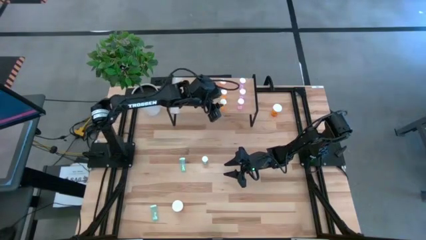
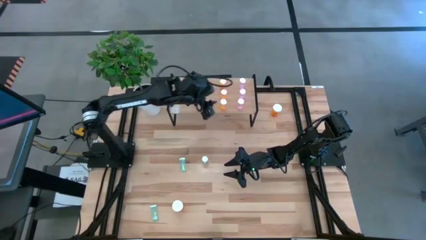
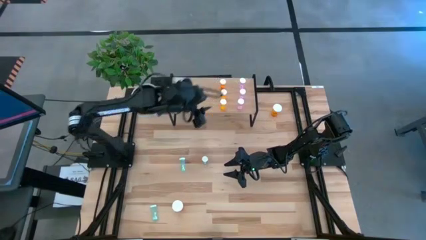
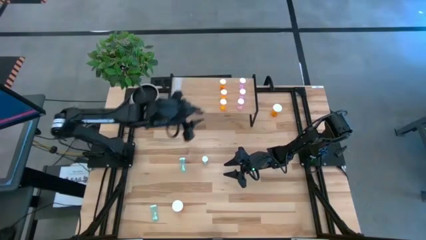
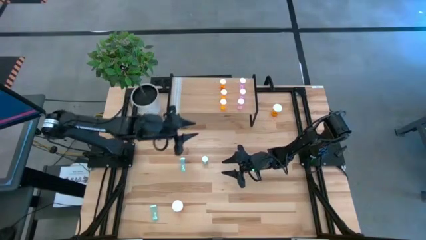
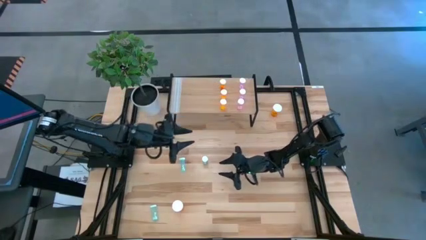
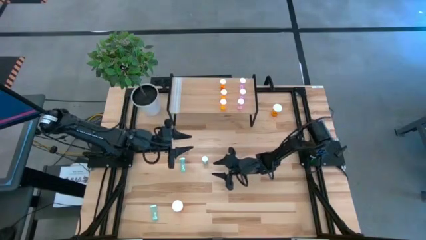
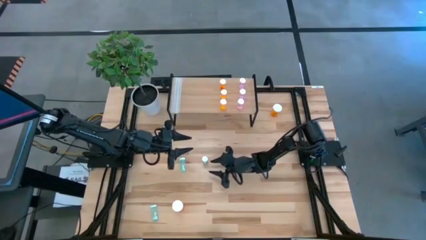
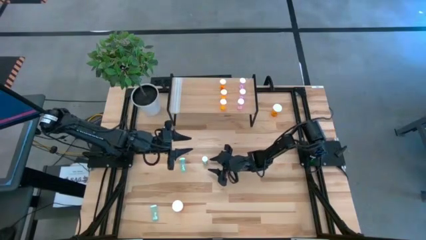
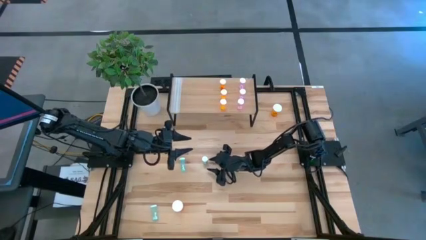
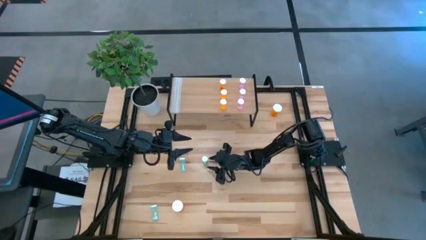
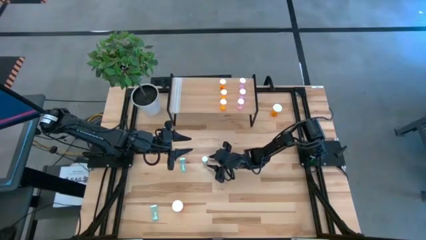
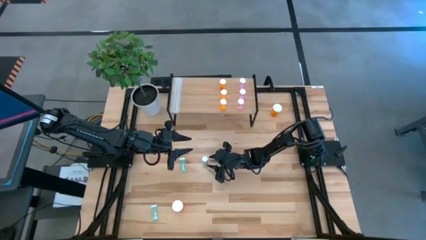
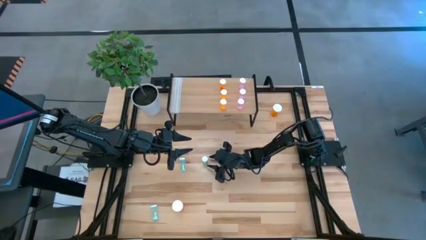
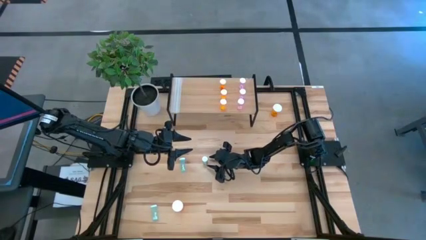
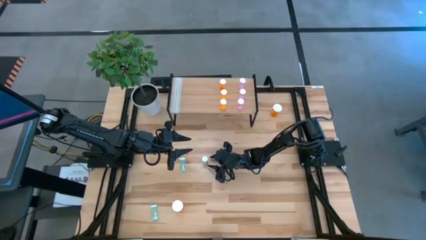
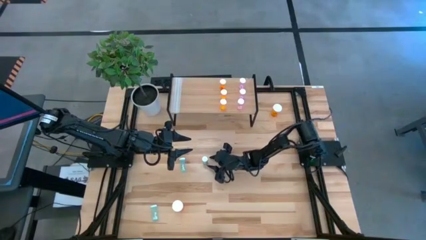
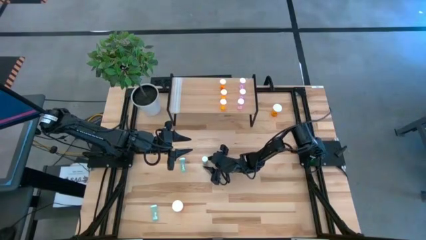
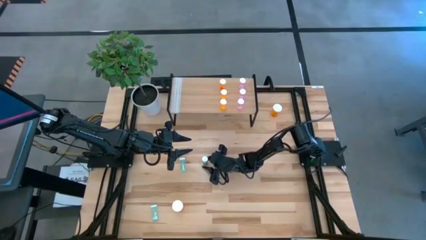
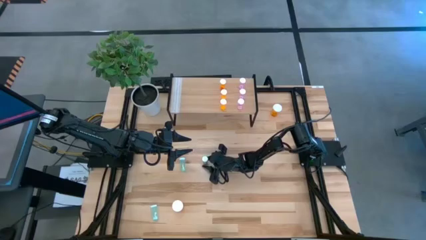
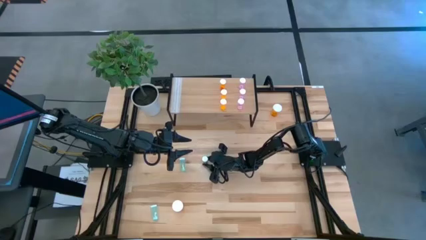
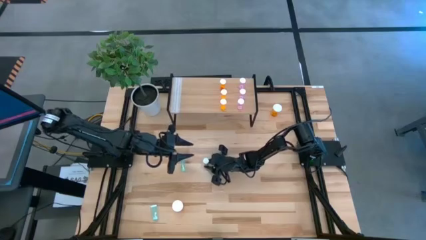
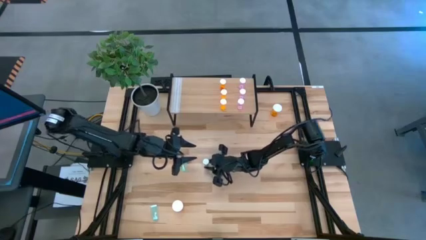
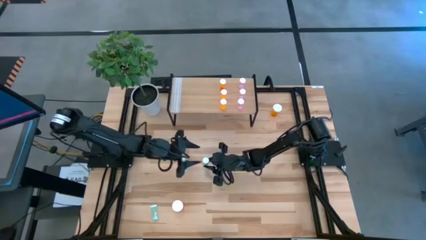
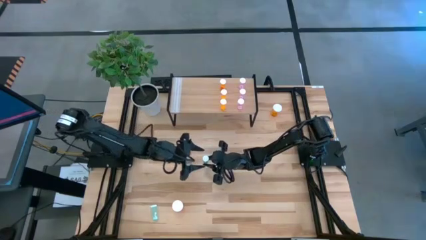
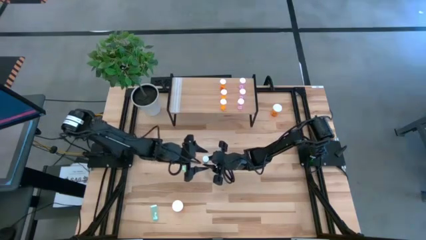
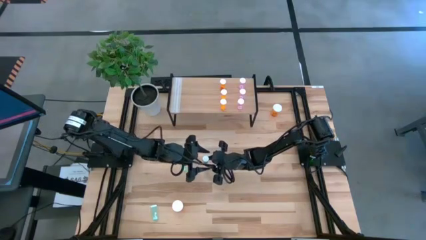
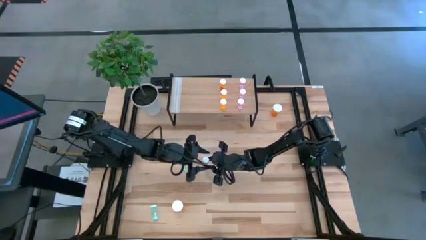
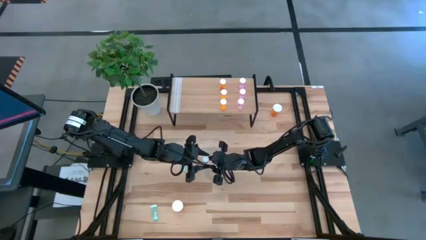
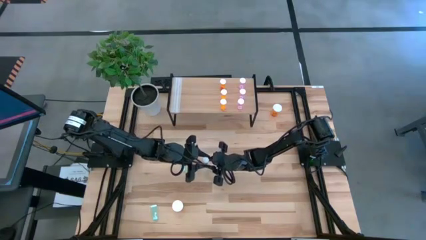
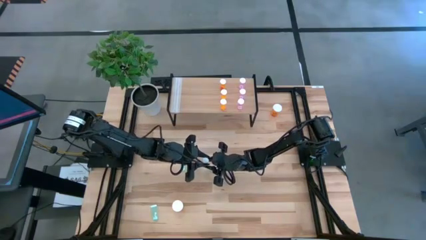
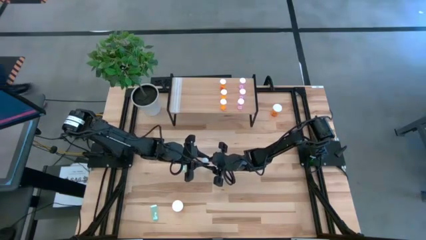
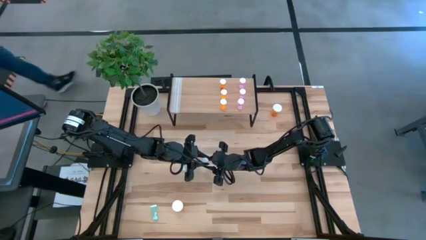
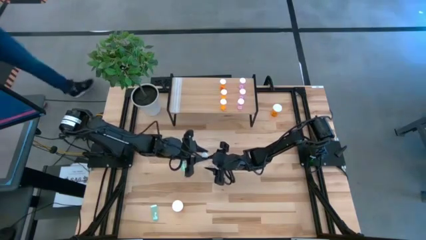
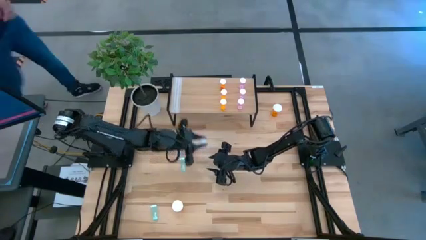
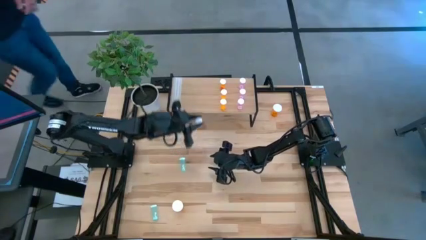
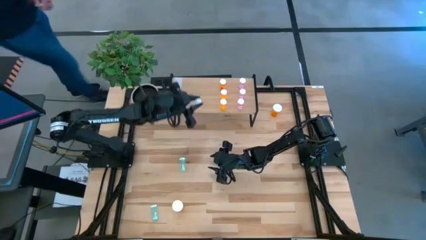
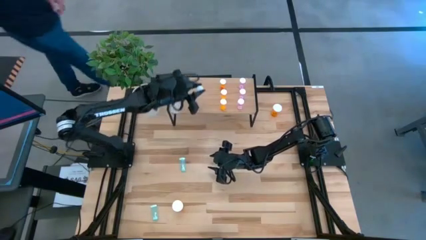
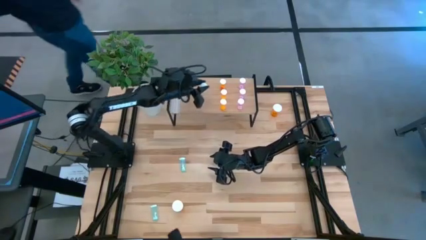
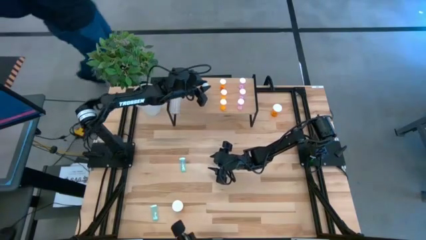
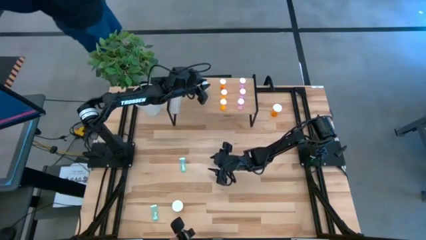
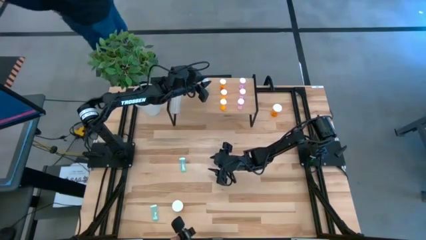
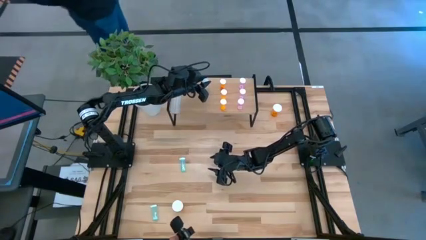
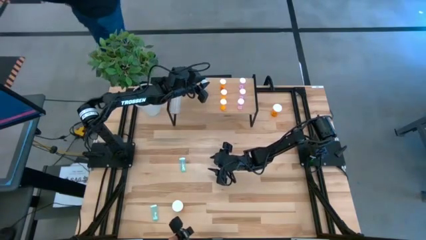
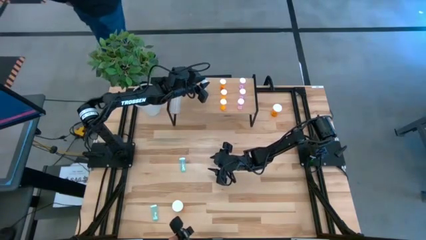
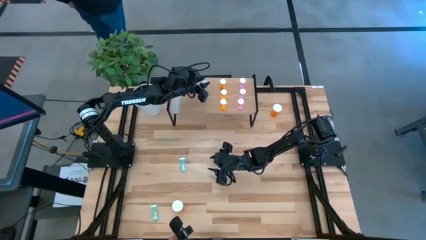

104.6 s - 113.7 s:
Task: Pick and place medicine bottles onto shelf by color
Put the right blue pill bottle on the shelf

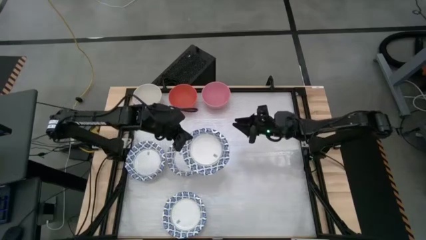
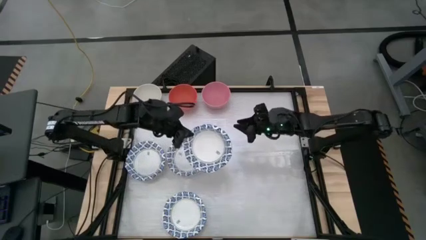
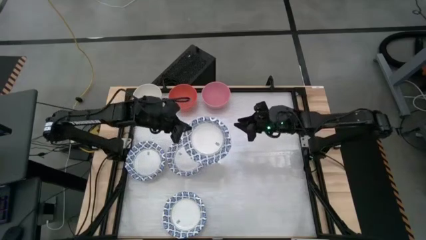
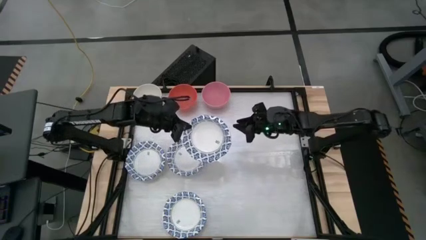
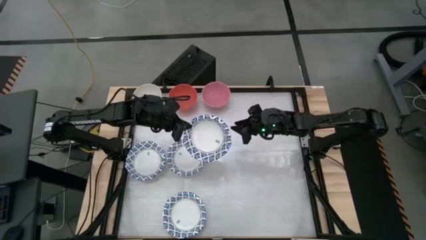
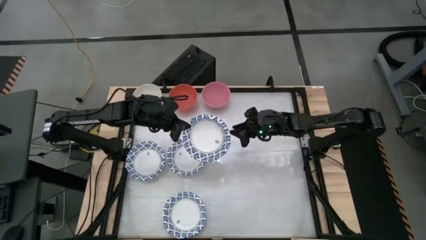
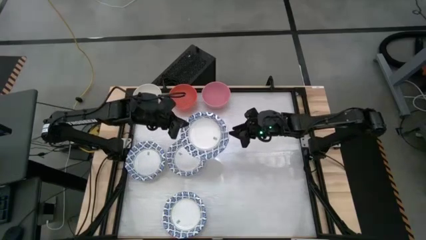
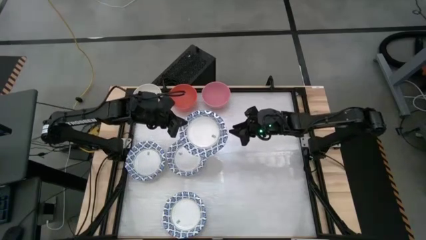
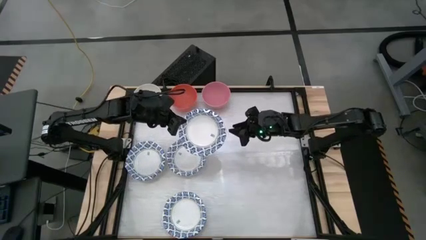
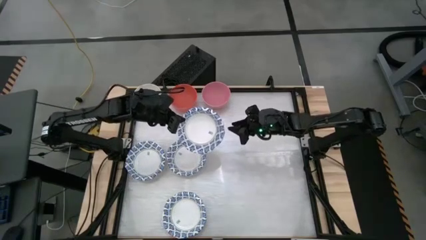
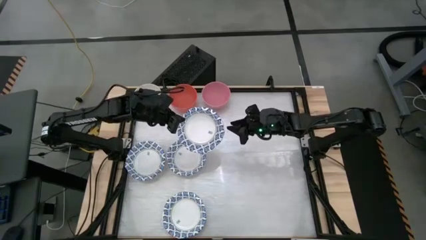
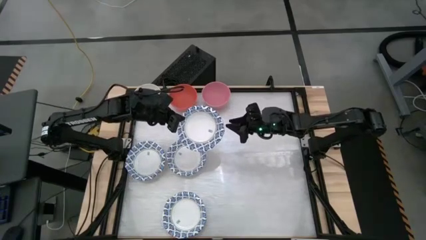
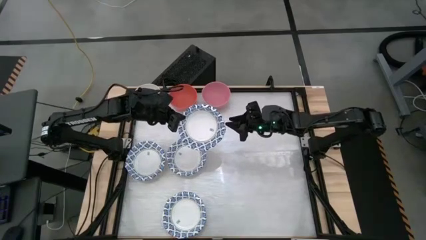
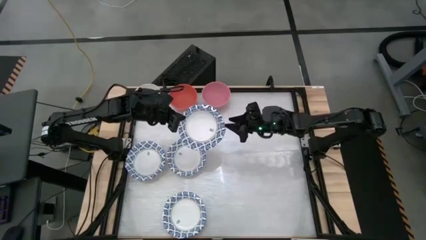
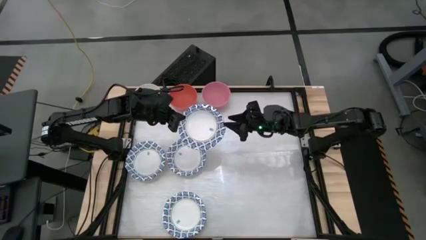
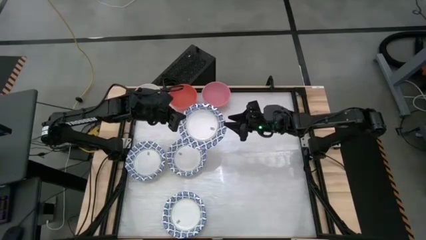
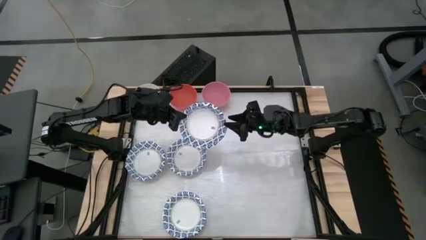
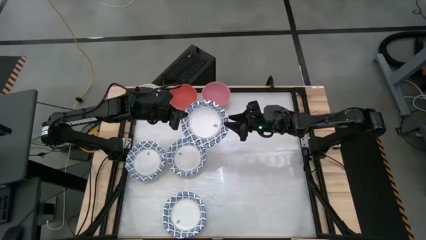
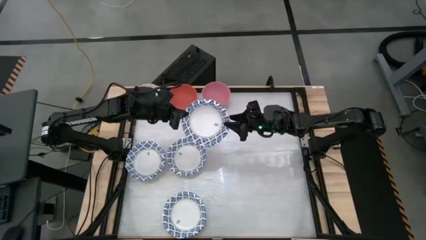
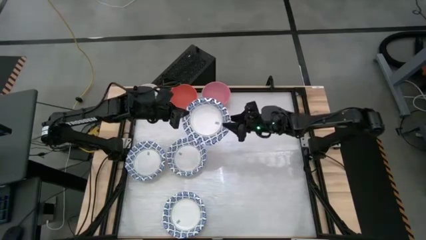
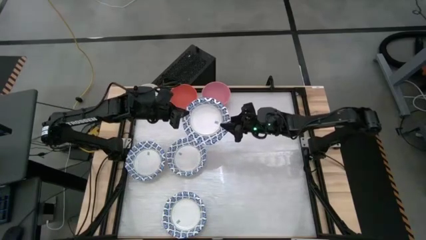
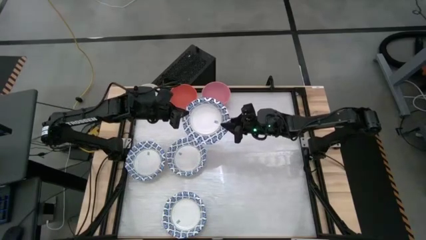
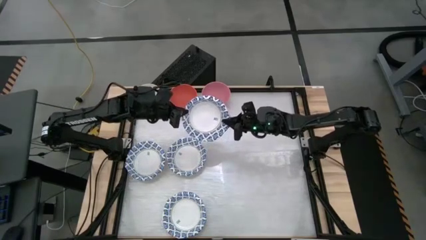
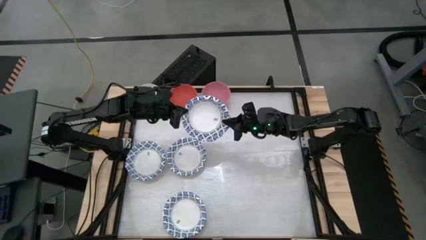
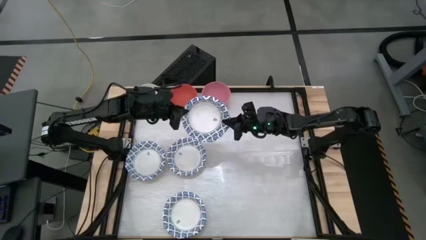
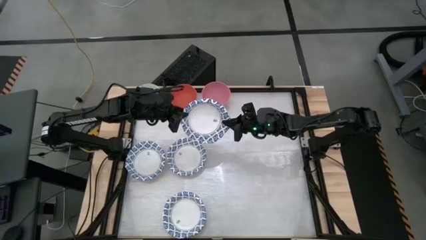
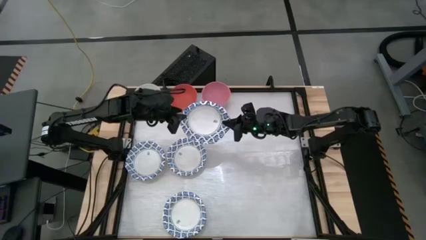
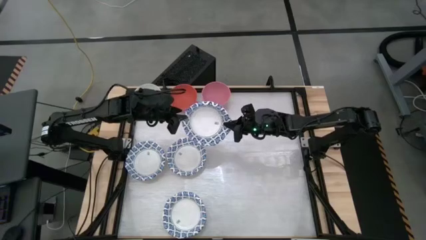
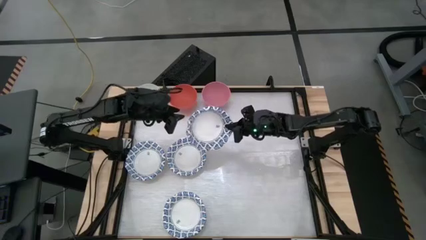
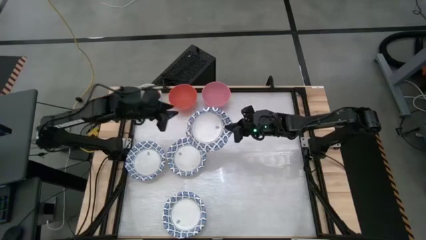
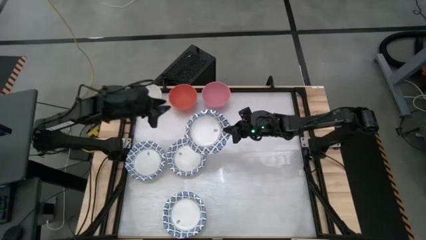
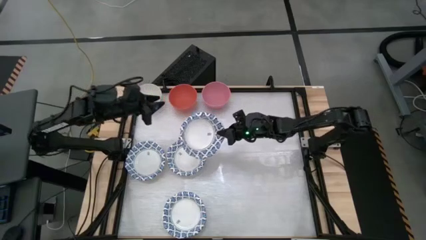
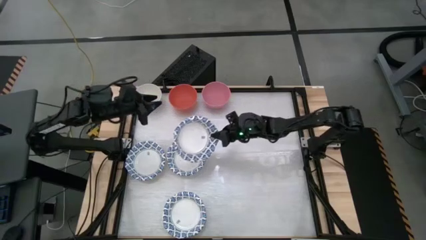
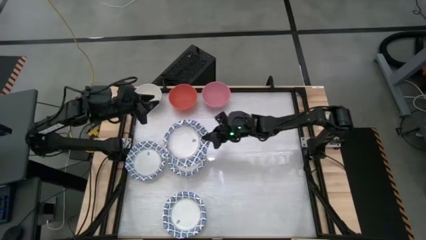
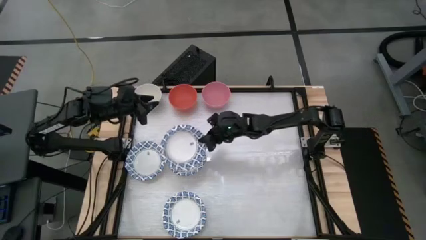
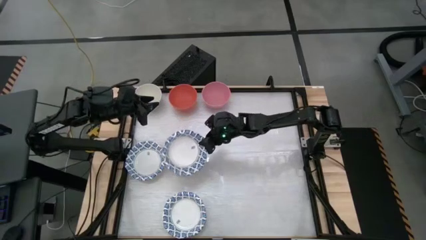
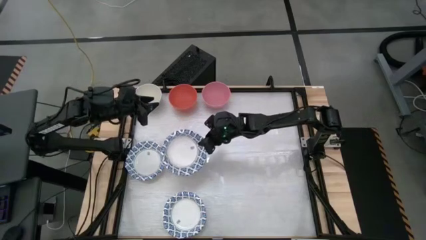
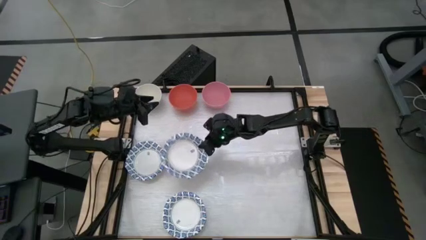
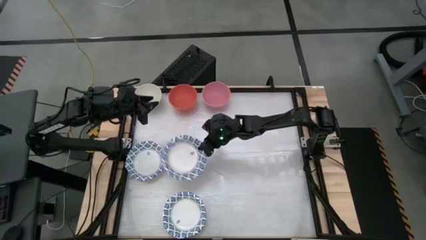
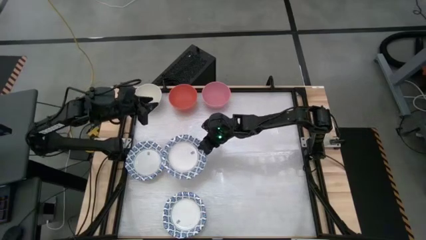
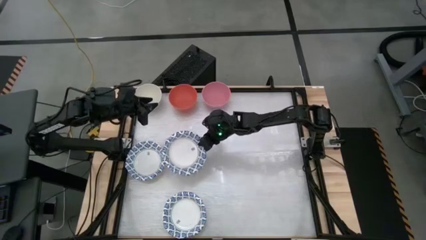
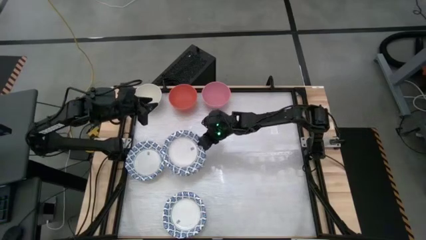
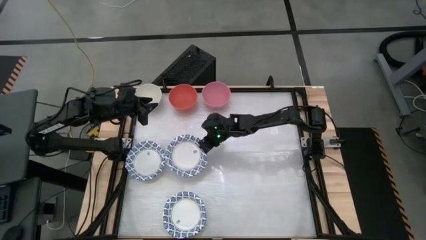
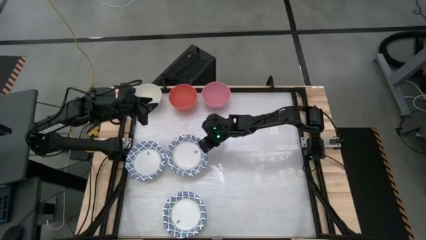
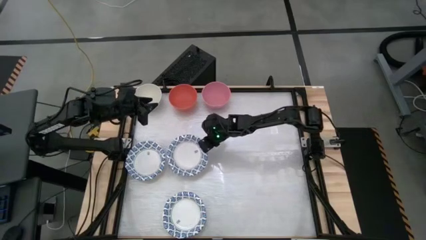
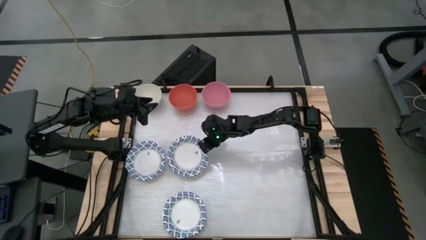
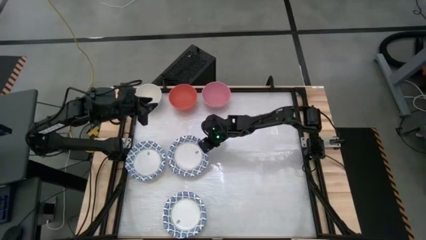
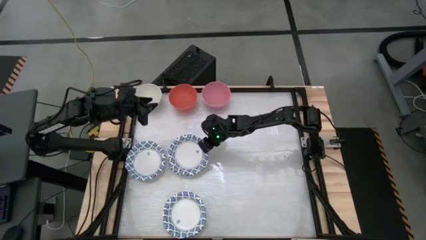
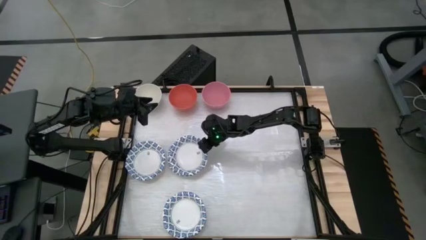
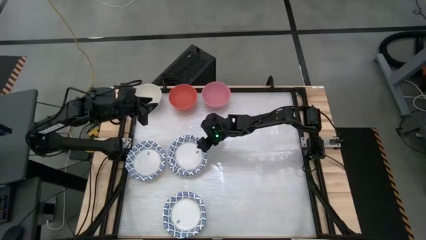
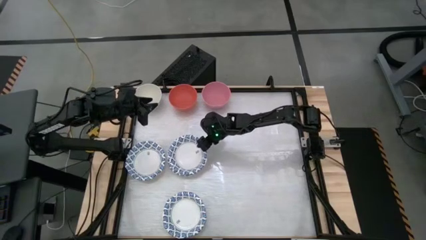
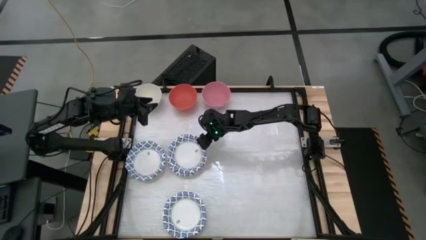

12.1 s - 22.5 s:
Task: Nest bowls inside each other by size order
Stack the white patterned bowl on top of the white patterned bowl
